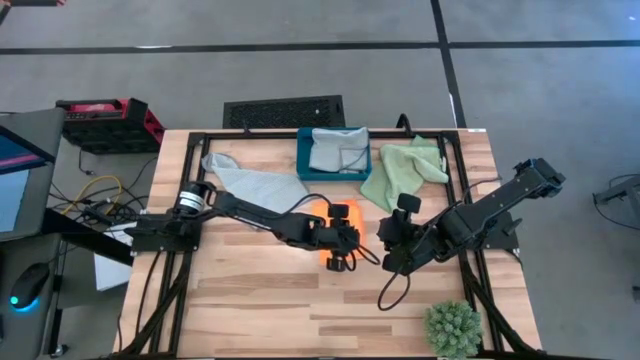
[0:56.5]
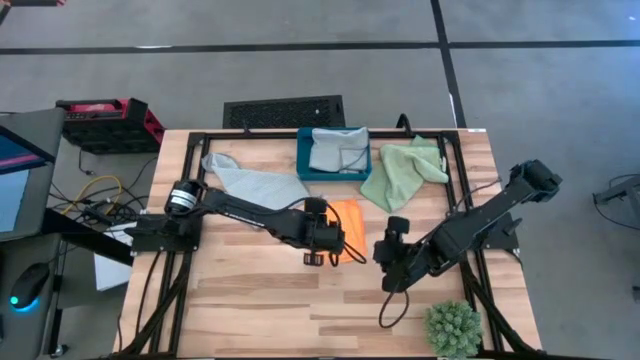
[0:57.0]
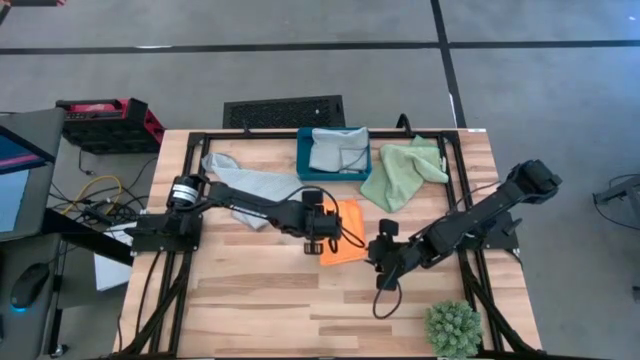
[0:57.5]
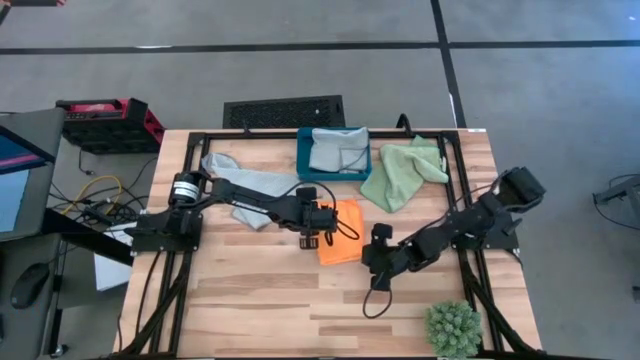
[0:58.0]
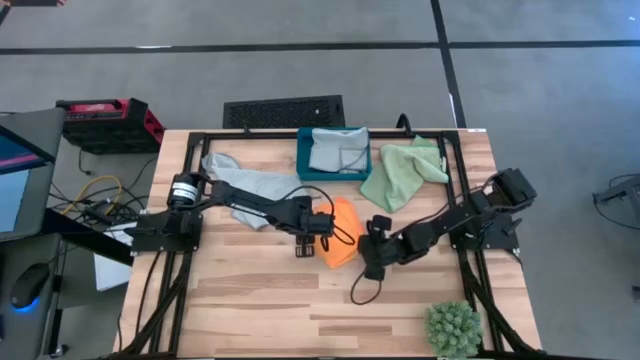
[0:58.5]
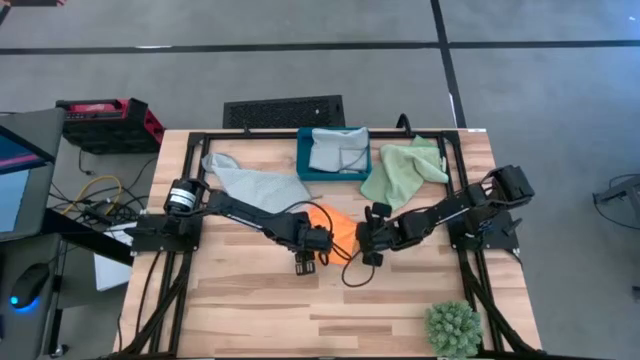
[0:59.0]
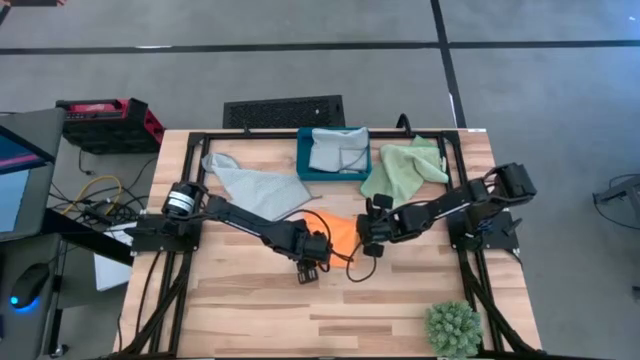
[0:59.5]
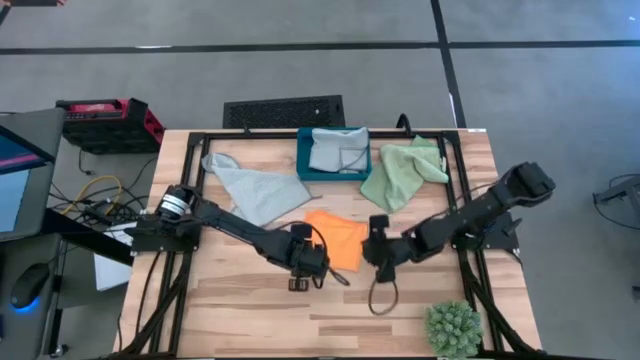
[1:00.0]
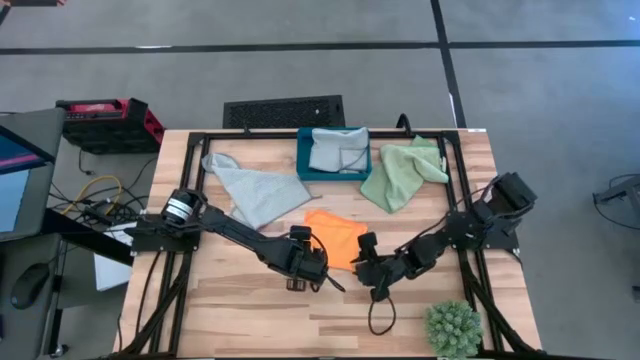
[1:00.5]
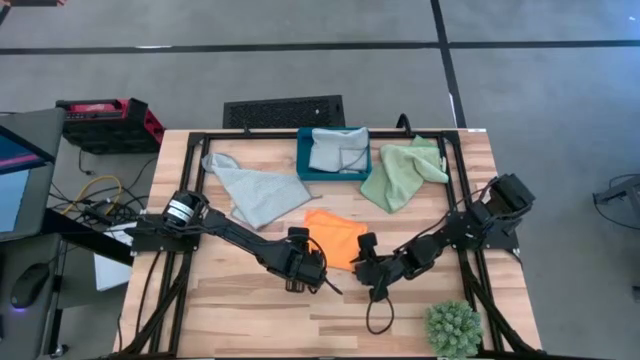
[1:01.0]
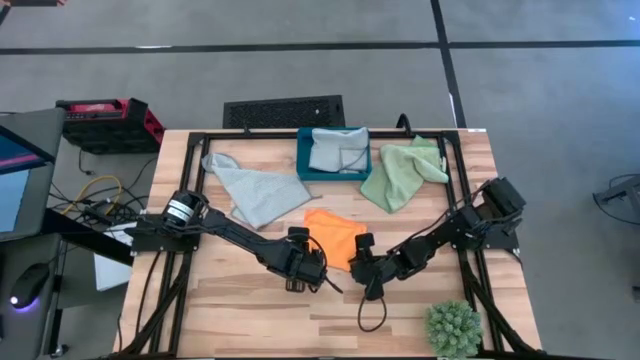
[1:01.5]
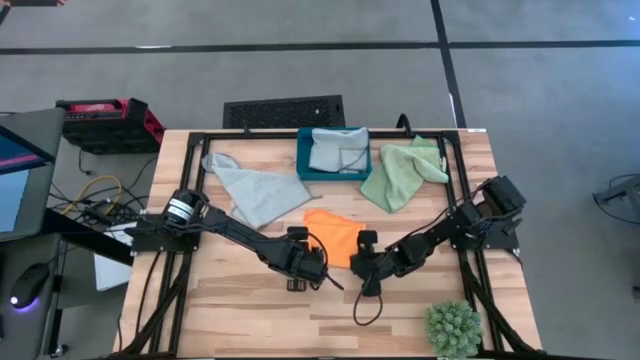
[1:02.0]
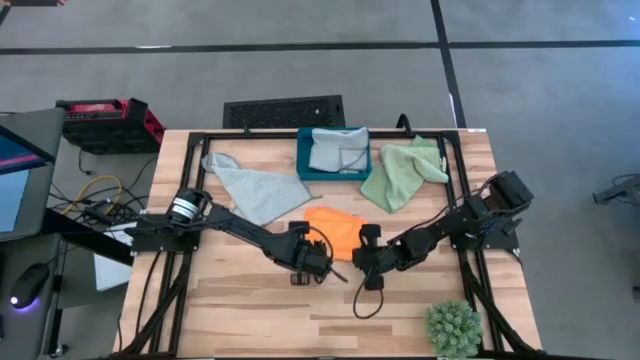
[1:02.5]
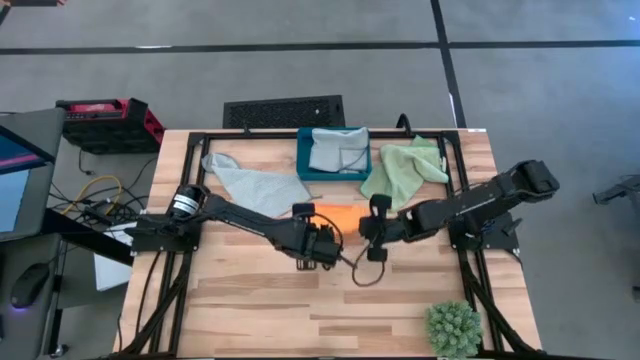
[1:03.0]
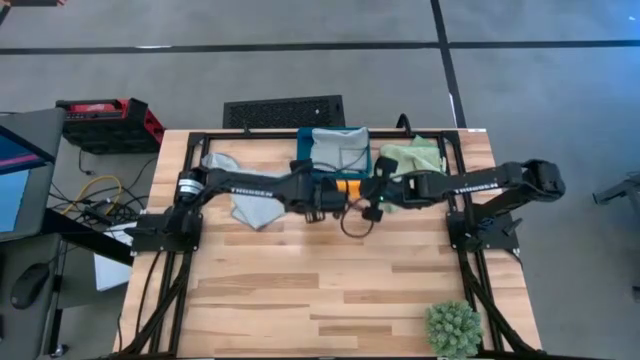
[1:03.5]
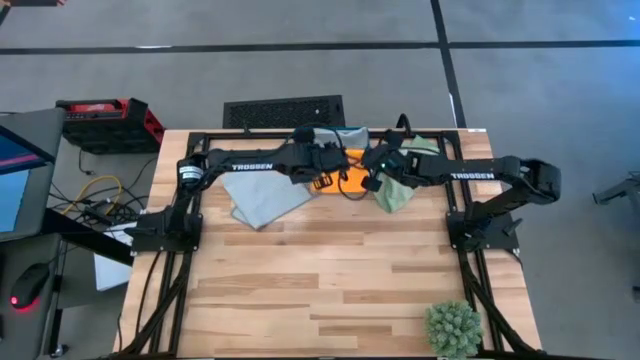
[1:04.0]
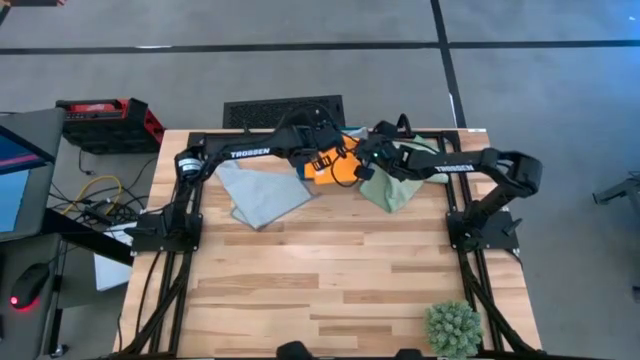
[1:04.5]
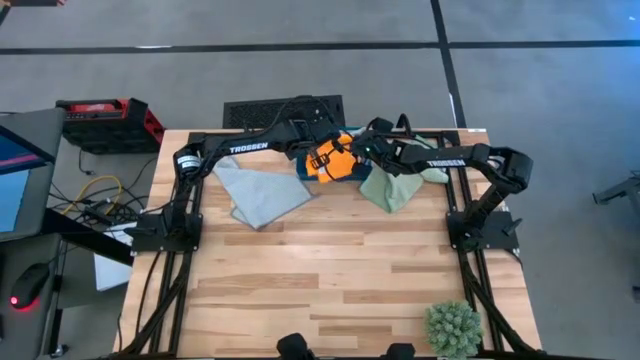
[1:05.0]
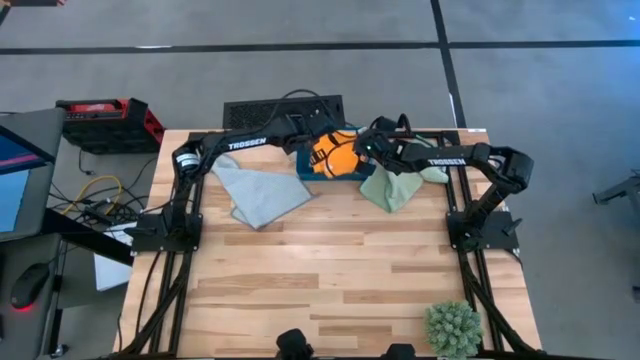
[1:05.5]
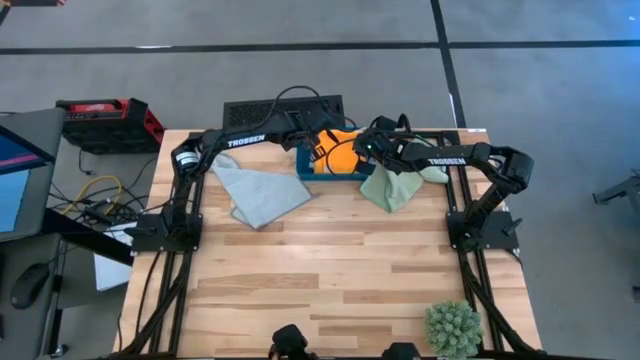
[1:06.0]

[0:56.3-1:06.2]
Task: Fold microfiber towels
Put the folded orange microfiber cloth into the blue bin

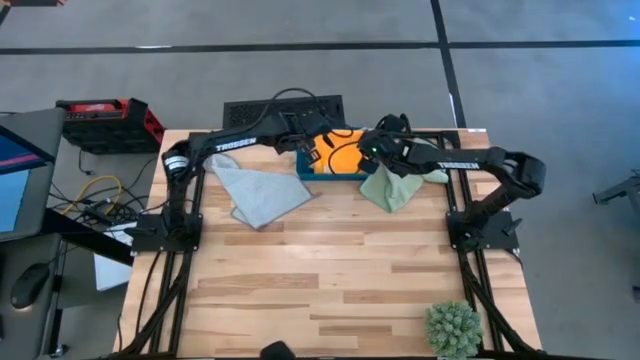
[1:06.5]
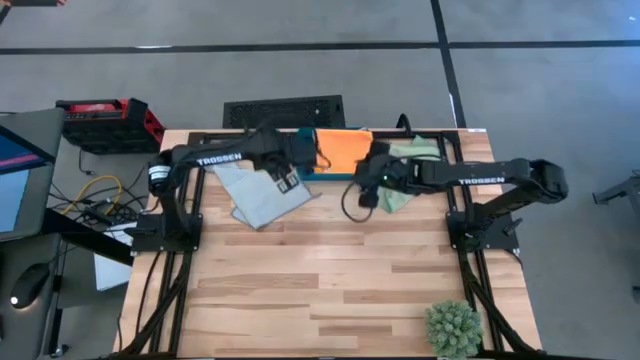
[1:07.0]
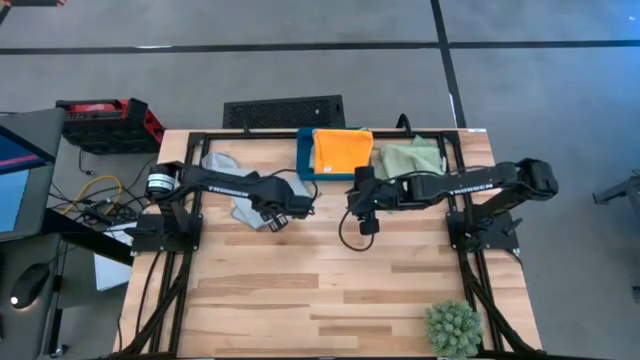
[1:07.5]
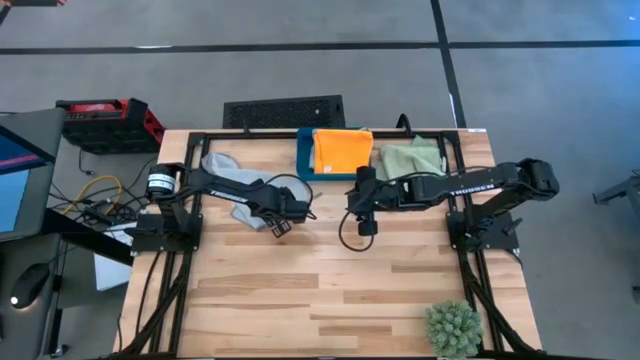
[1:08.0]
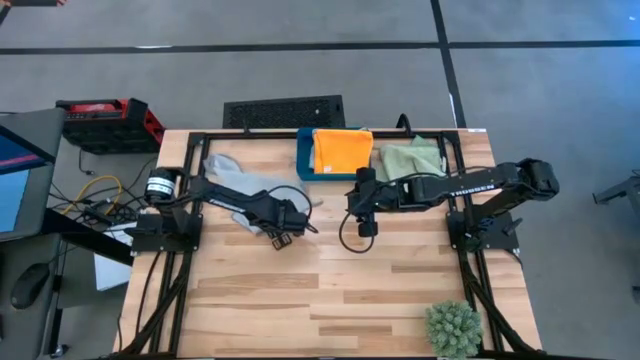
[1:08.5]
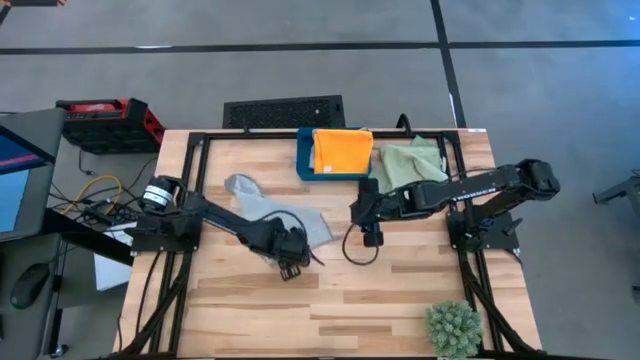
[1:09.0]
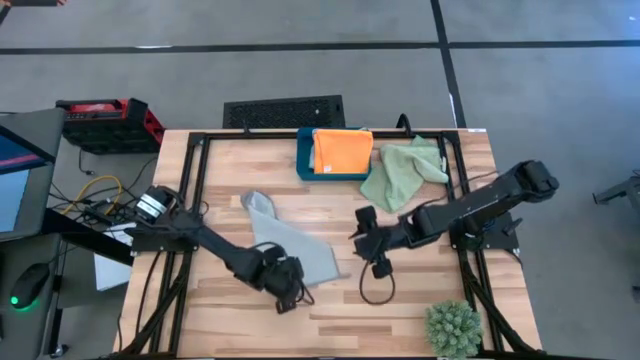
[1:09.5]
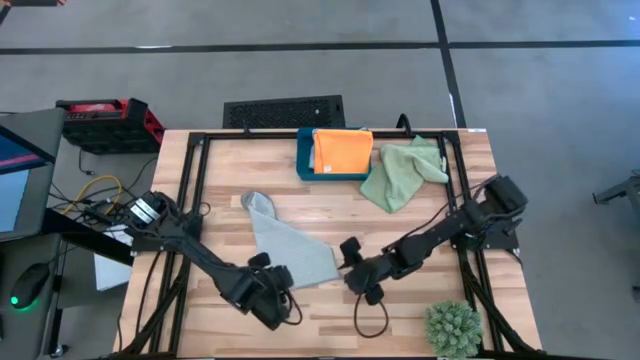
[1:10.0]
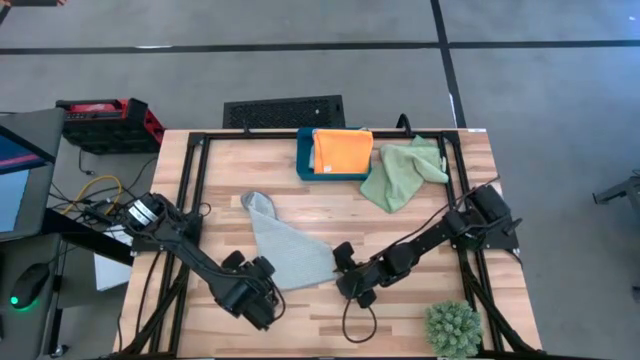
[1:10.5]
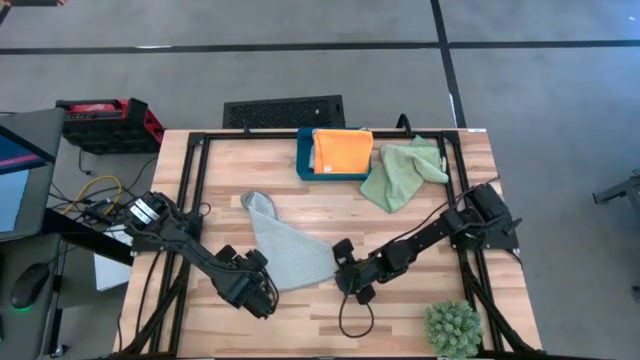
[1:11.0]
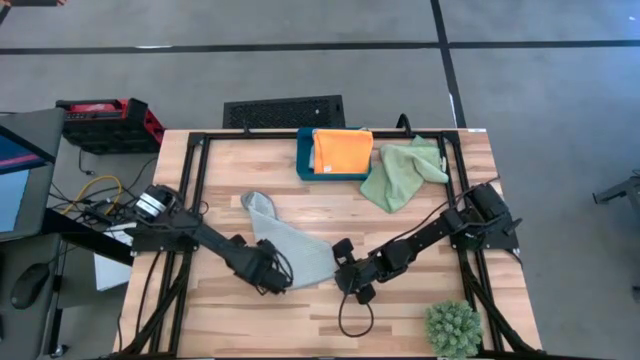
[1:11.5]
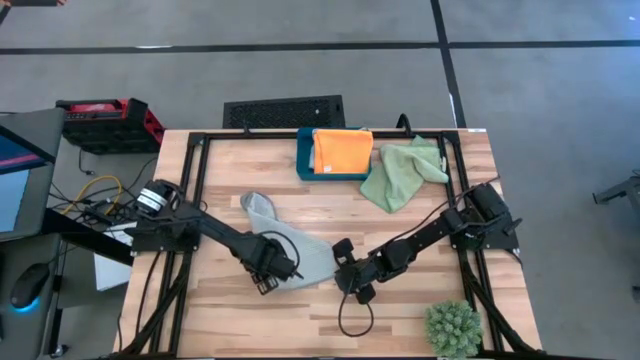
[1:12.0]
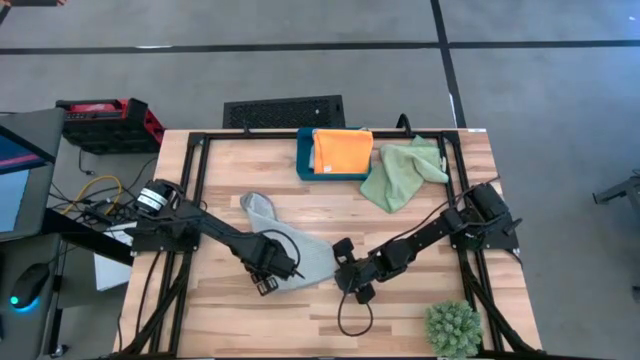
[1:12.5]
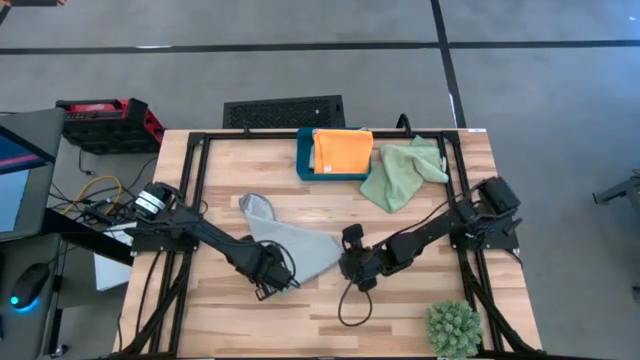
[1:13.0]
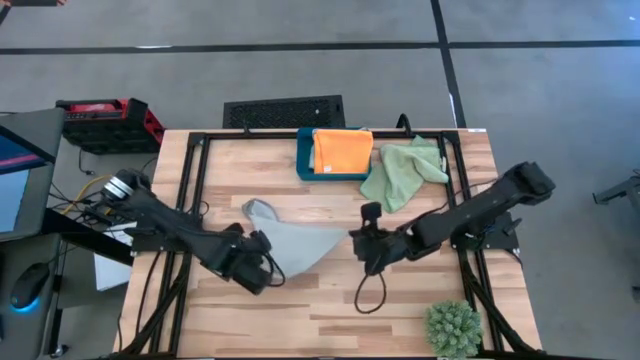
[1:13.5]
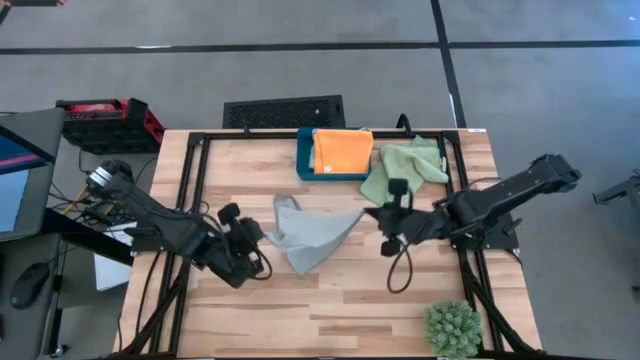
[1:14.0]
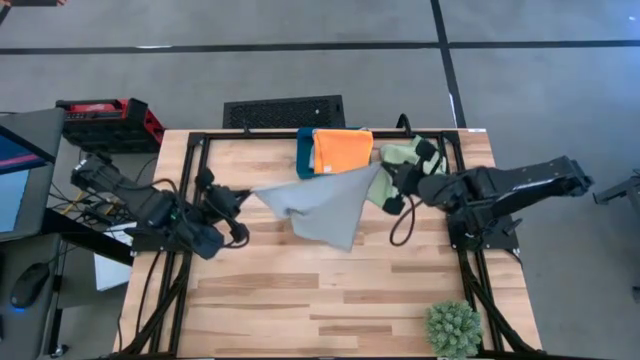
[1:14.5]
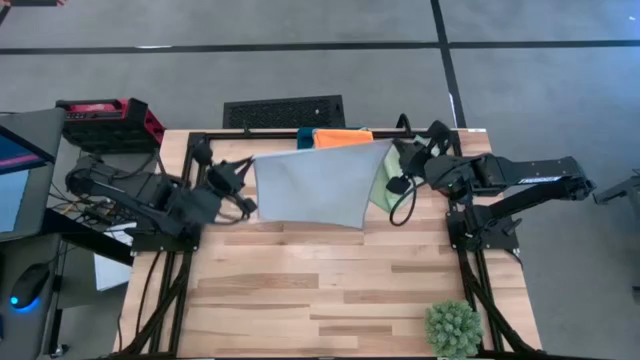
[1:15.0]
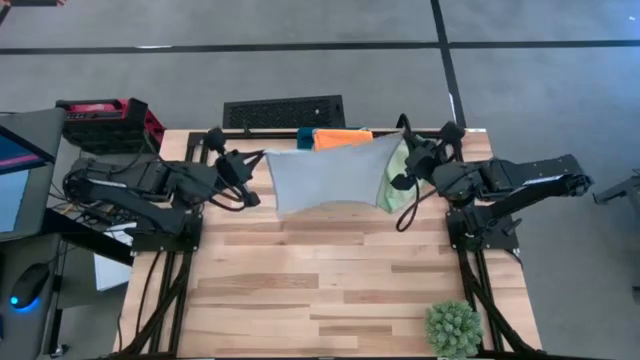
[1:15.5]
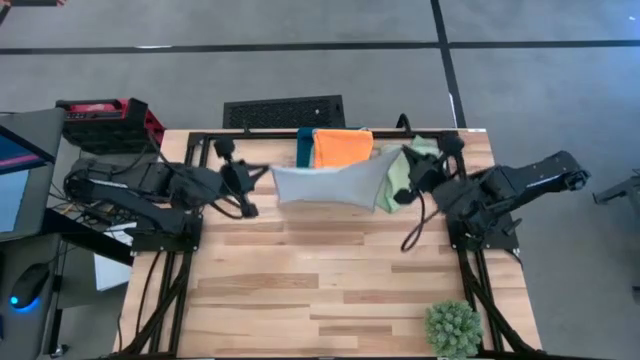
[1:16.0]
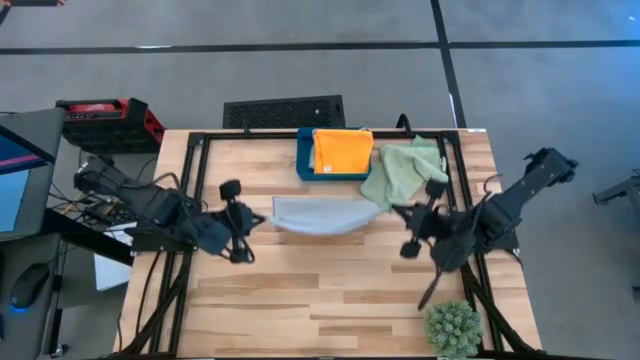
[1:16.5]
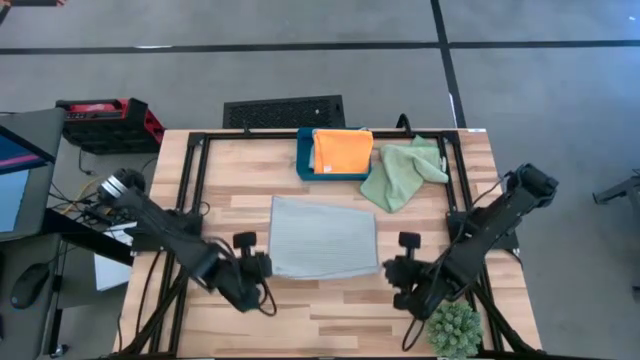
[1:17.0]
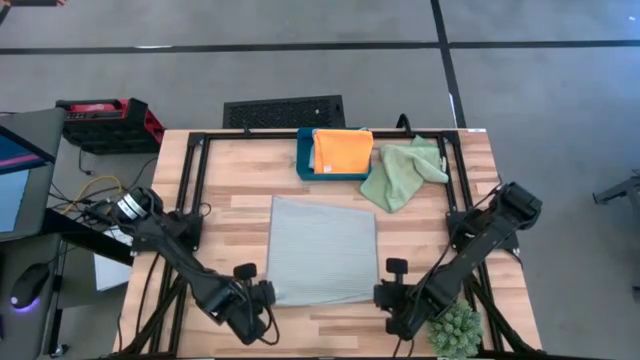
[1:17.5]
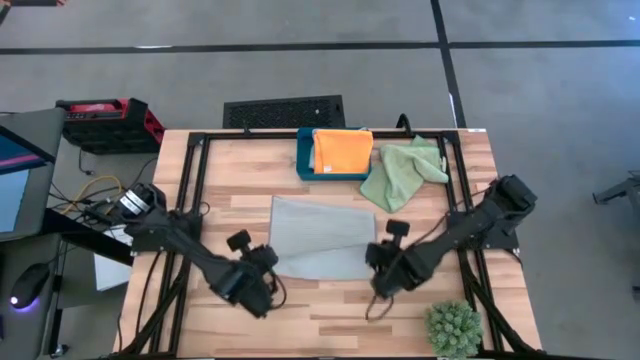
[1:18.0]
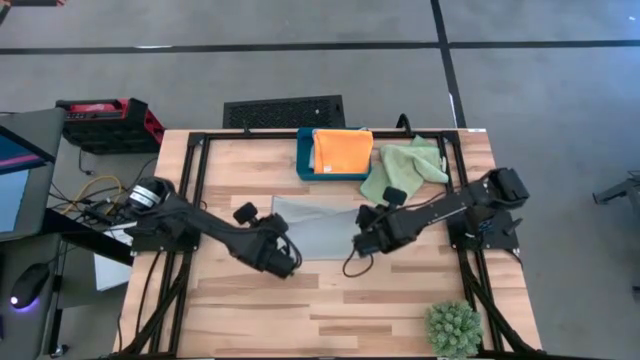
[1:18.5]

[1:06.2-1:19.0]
Fold the gray microfiber cloth
